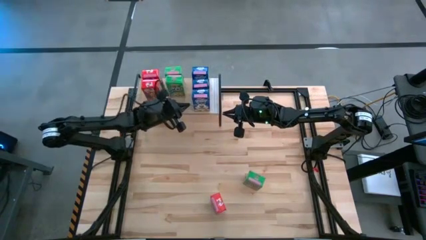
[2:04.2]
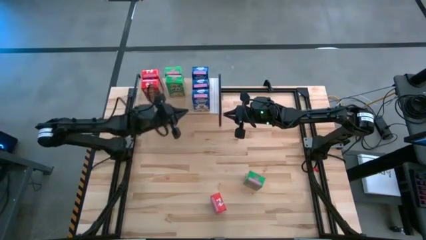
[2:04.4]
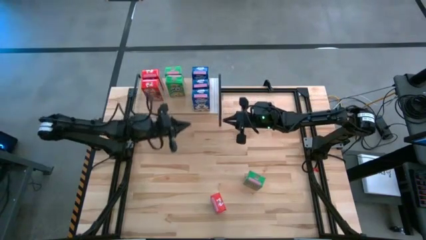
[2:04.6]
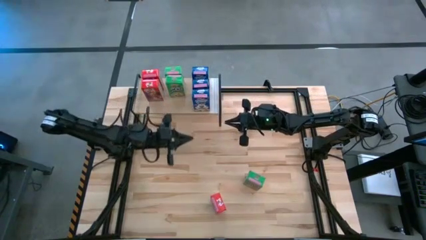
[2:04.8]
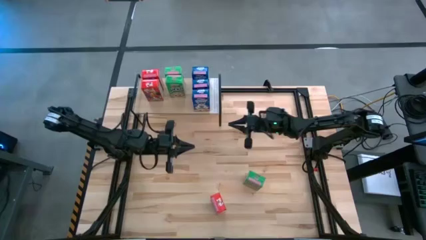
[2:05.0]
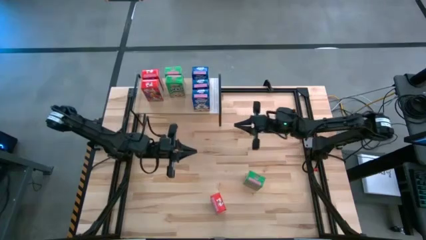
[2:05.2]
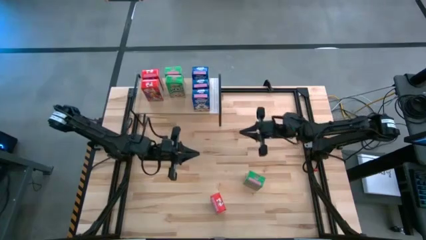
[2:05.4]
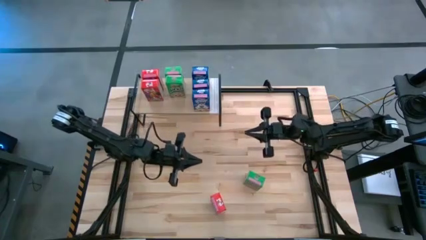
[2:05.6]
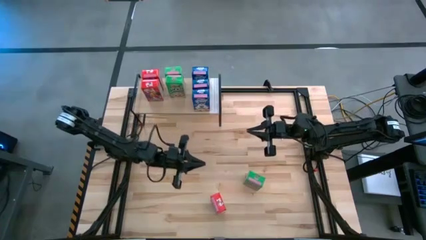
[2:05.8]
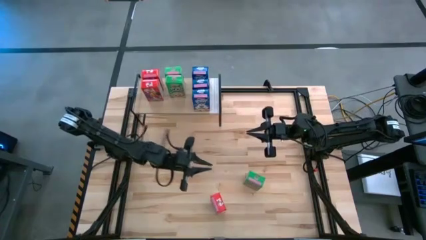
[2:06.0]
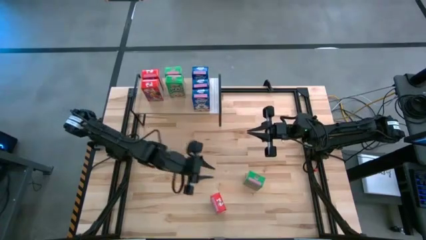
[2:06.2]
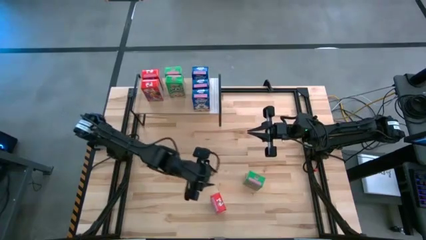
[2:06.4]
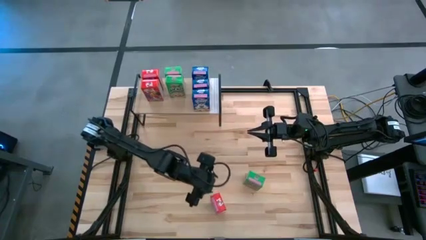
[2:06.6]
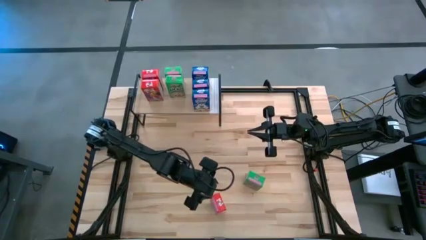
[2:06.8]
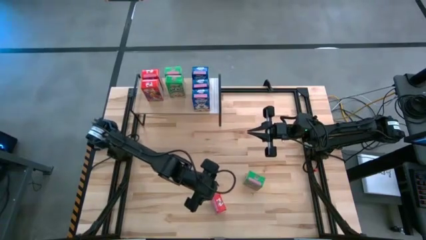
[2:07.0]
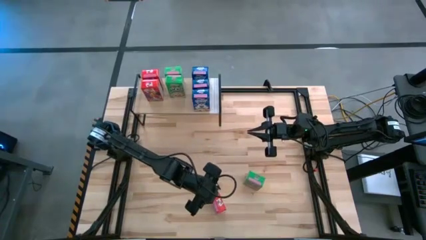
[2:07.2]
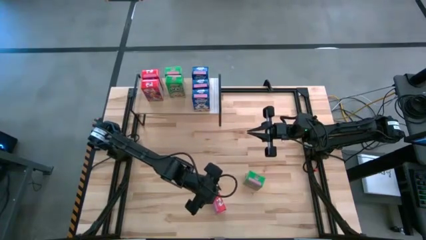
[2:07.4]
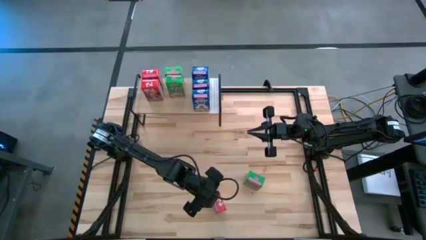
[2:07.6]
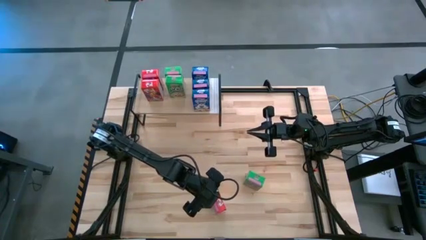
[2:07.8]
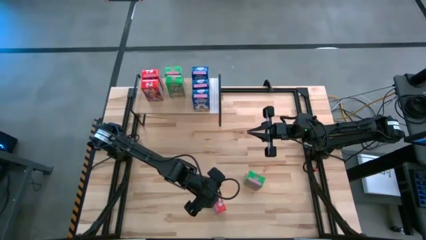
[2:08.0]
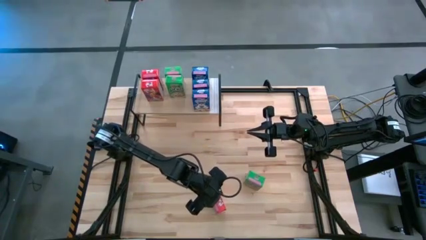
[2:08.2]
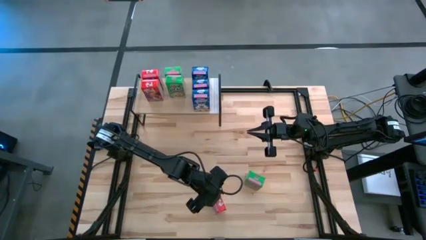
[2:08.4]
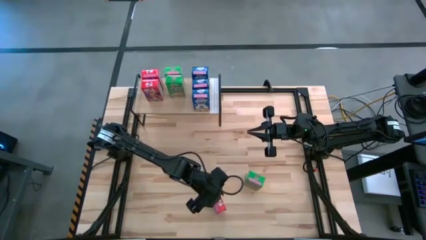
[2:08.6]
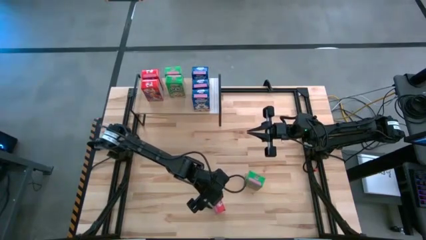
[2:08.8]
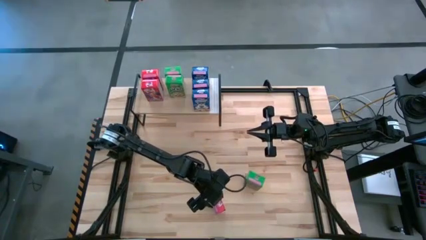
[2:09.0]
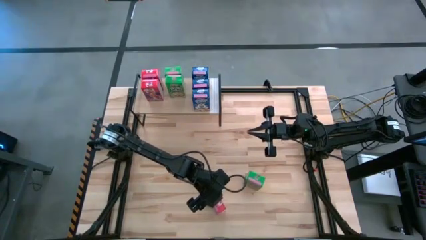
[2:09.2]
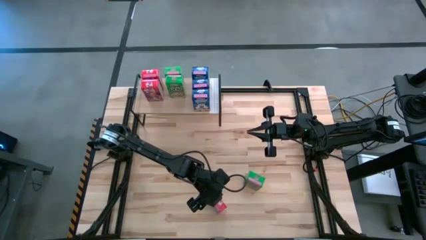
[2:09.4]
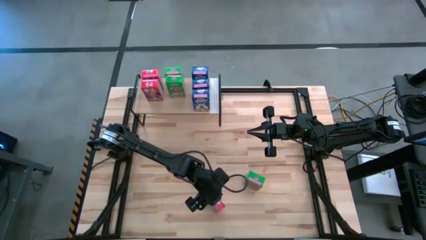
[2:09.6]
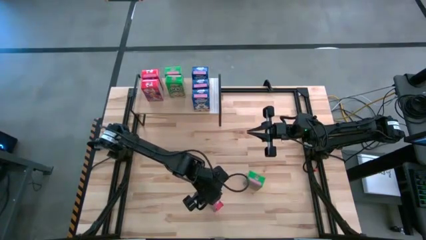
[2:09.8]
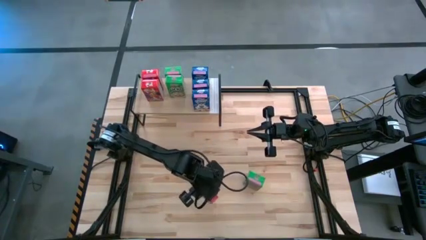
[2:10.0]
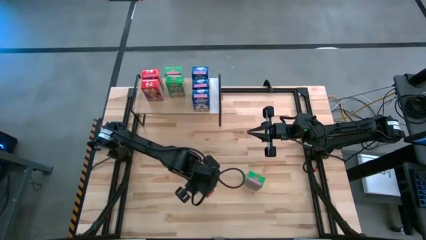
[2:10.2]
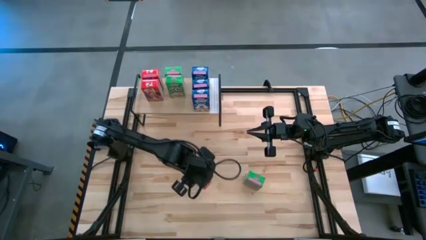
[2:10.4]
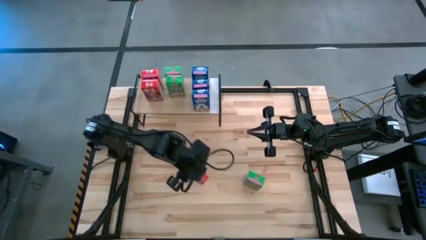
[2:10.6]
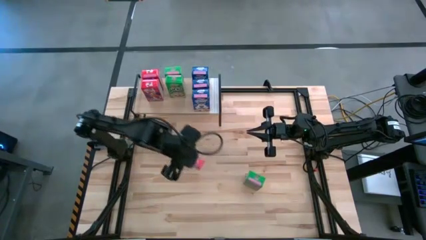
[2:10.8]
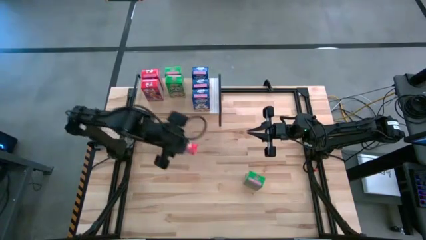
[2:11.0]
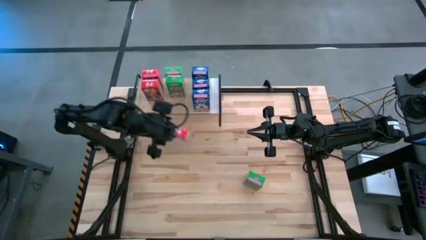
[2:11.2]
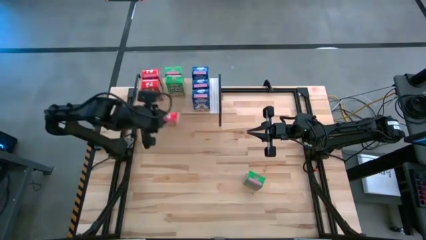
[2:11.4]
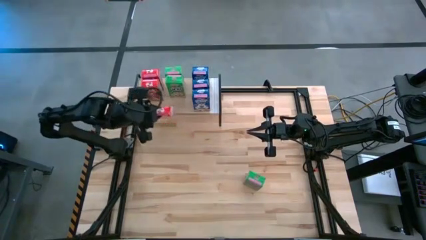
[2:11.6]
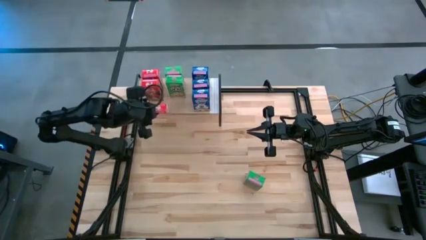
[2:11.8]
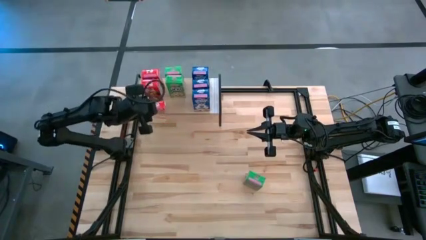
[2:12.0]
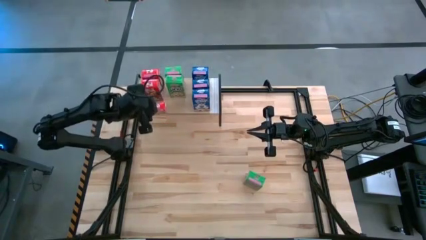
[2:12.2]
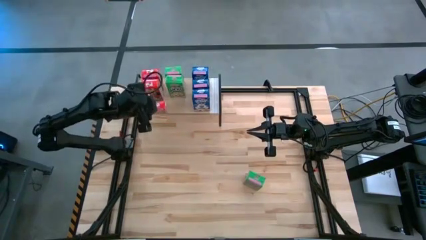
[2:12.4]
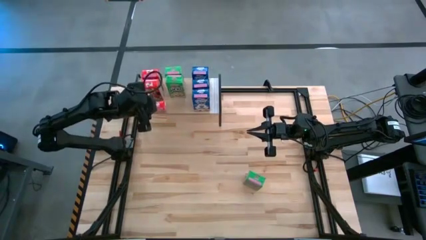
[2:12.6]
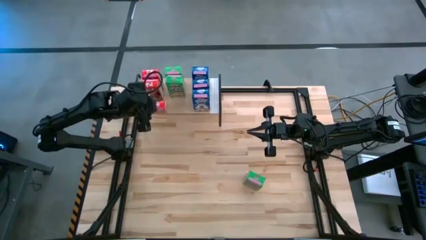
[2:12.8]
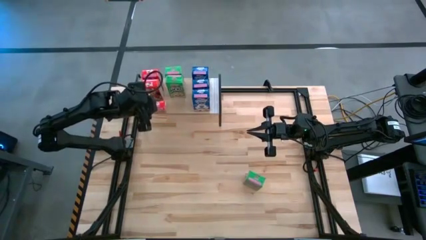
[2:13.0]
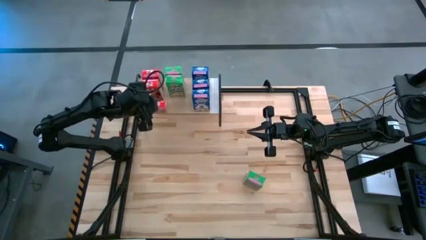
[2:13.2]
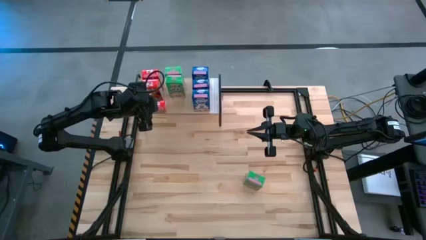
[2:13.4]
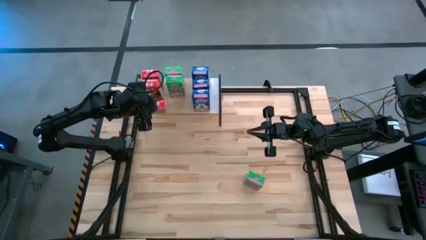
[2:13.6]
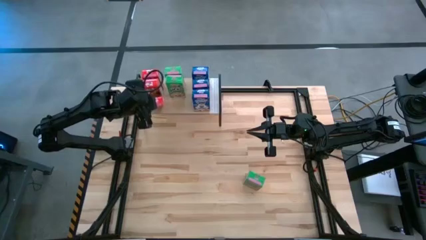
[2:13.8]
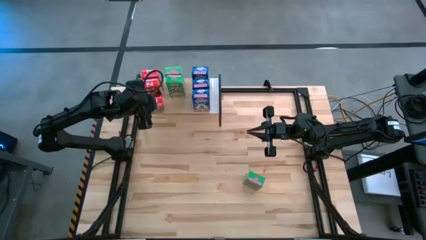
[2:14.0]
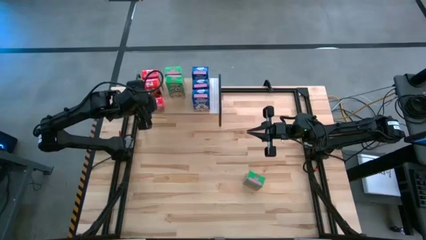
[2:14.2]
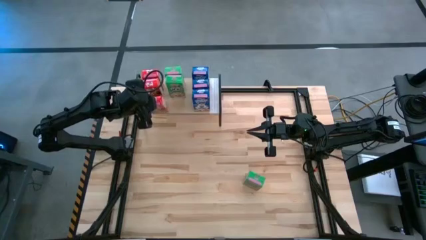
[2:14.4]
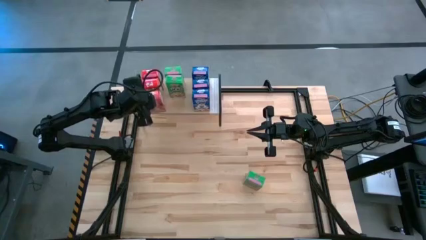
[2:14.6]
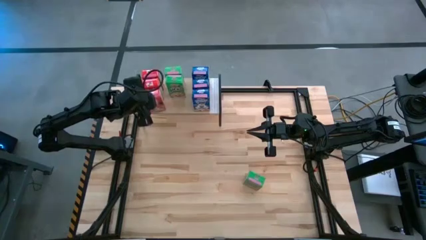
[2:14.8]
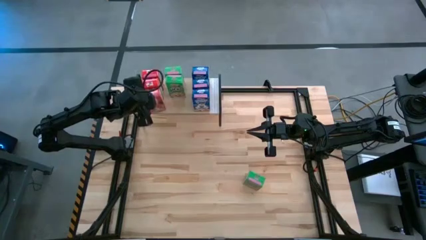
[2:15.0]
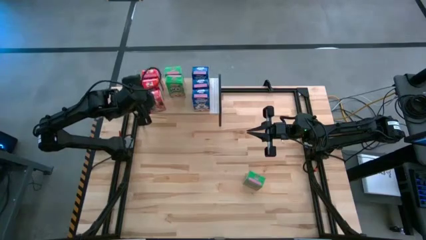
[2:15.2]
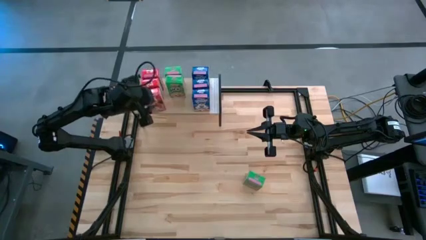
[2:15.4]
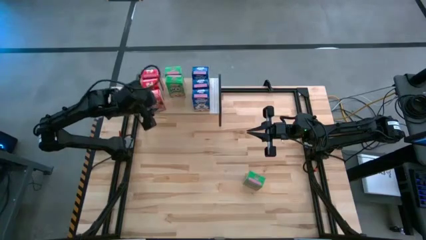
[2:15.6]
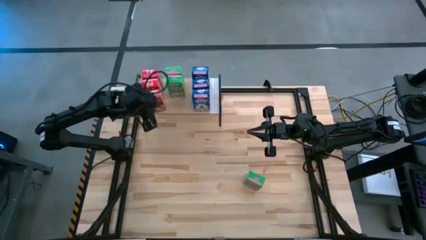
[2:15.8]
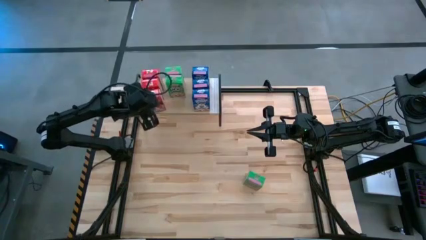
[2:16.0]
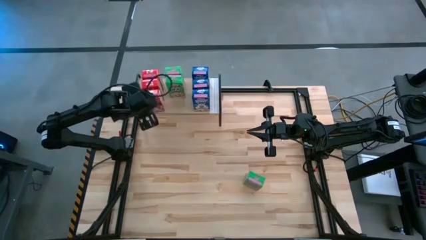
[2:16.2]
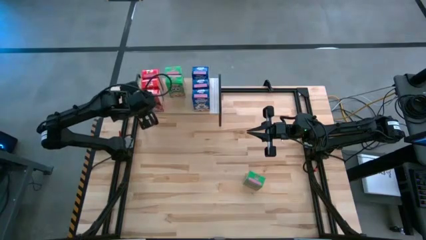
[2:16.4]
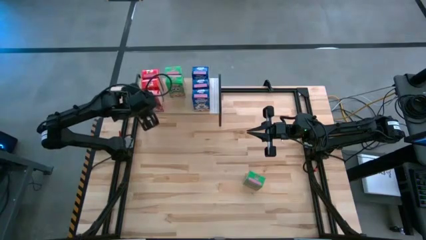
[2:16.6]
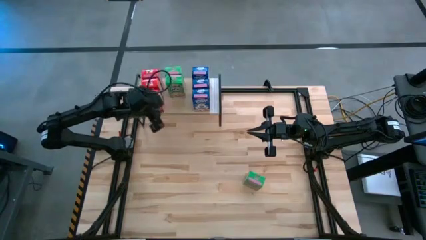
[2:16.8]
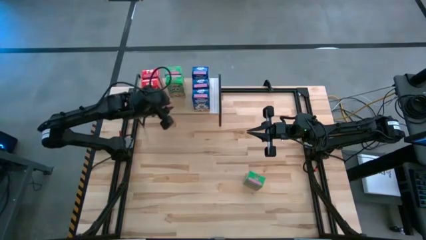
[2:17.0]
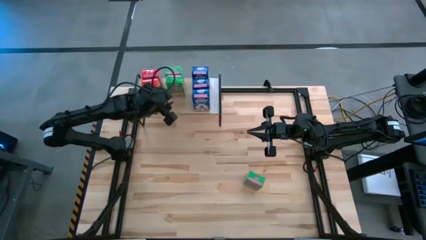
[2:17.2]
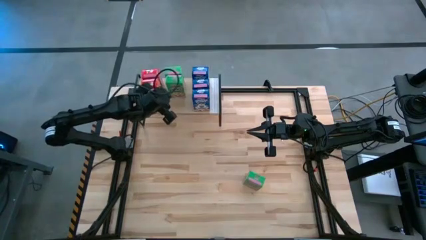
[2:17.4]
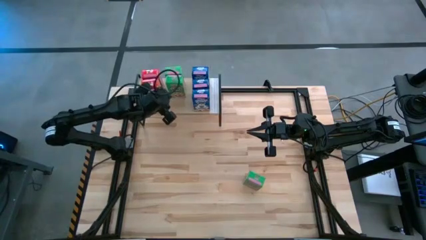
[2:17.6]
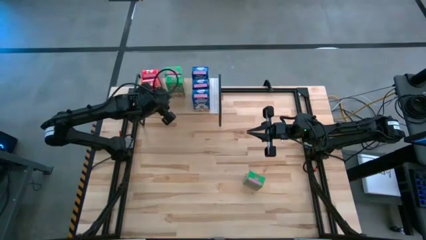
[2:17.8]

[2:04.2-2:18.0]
Task: Stack cereal on shelf
Put the red cereal box on the shelf aligned with the other red cereal boxes

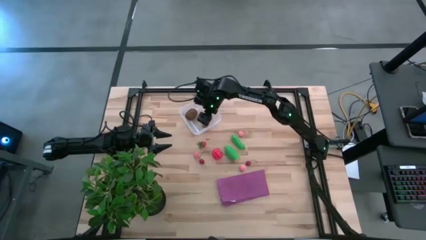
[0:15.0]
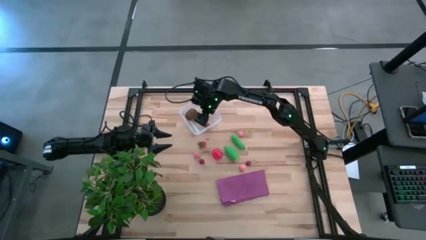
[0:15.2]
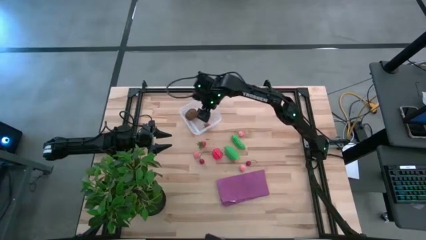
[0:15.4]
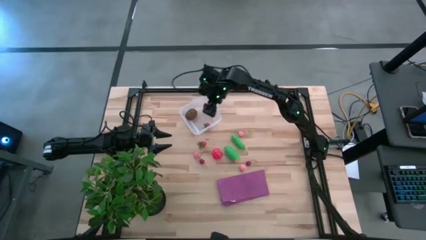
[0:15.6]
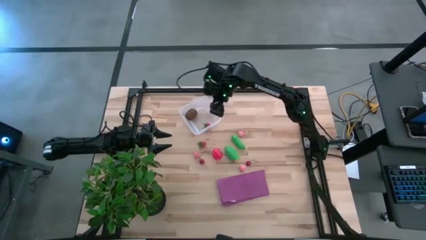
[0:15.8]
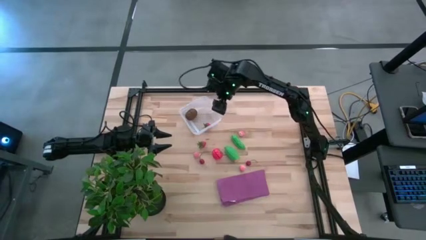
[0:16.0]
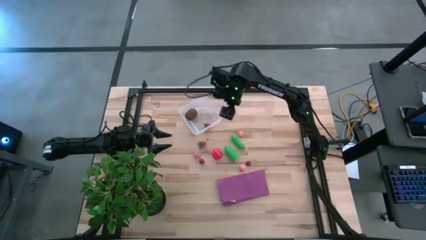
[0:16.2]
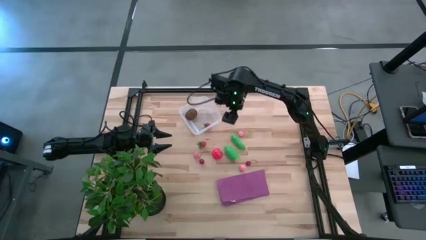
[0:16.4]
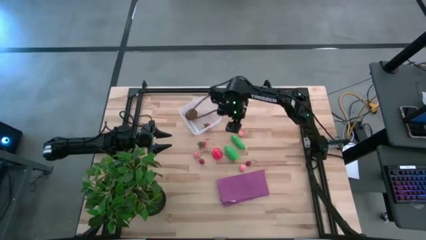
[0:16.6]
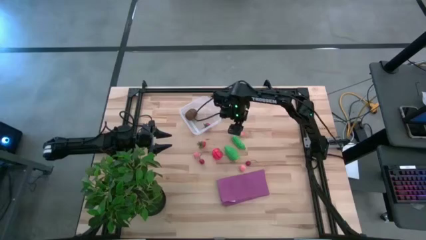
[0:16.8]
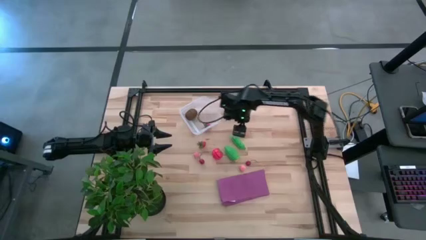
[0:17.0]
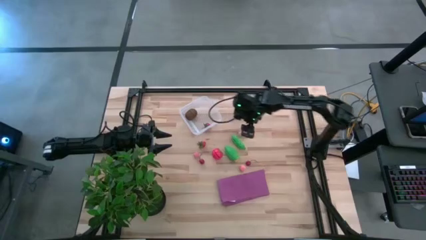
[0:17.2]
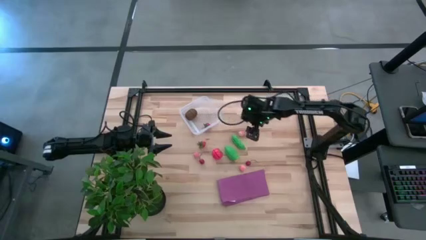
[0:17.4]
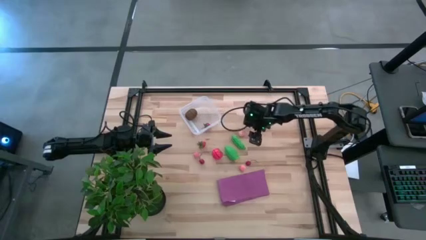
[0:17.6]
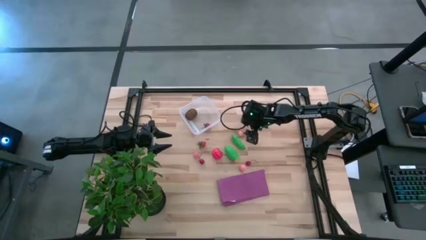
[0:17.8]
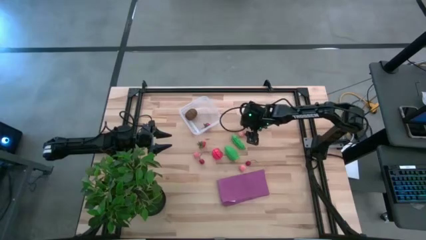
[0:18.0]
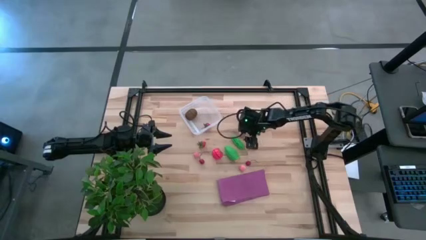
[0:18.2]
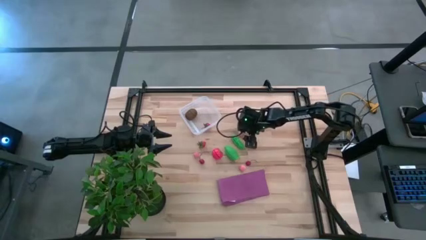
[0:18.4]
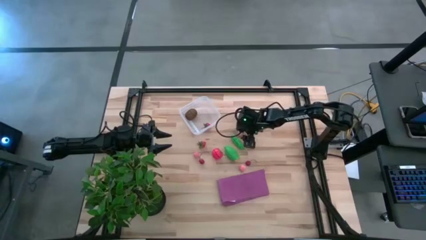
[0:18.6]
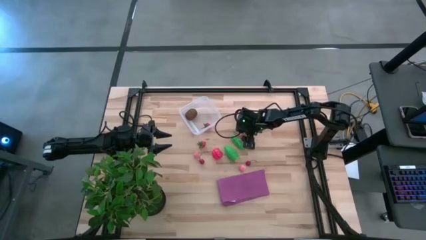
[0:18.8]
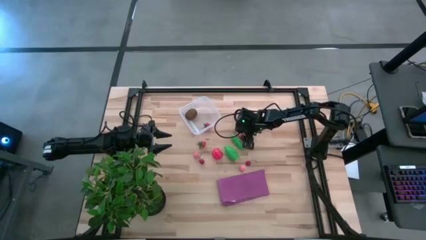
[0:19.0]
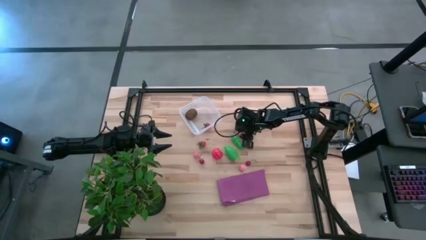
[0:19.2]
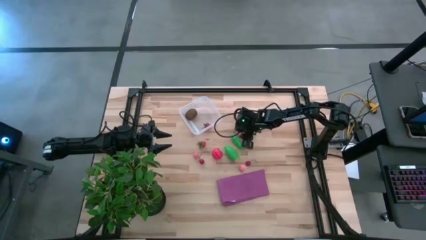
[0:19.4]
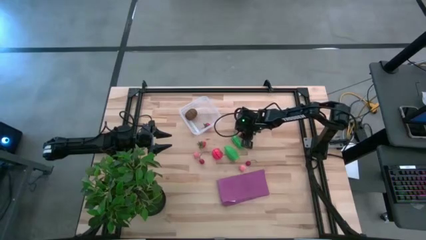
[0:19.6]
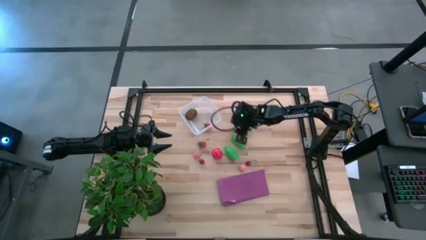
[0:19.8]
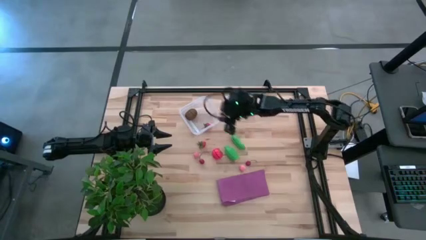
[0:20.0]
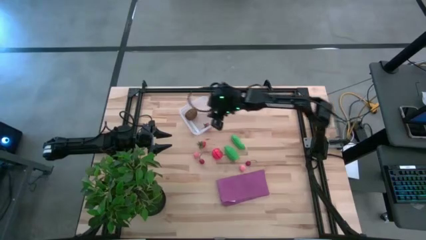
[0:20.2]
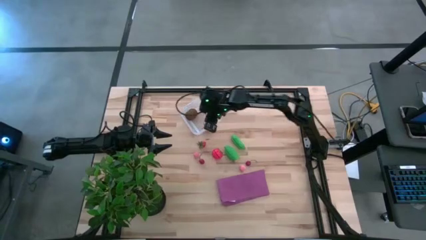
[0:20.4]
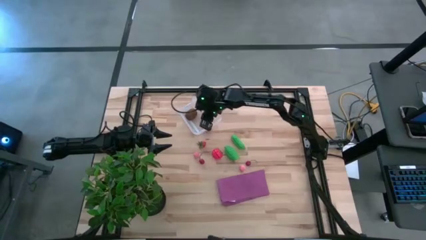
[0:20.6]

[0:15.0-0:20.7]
Task: Pick and placing Produce into tupperware
Put the top left pink peach into the transparent bin
